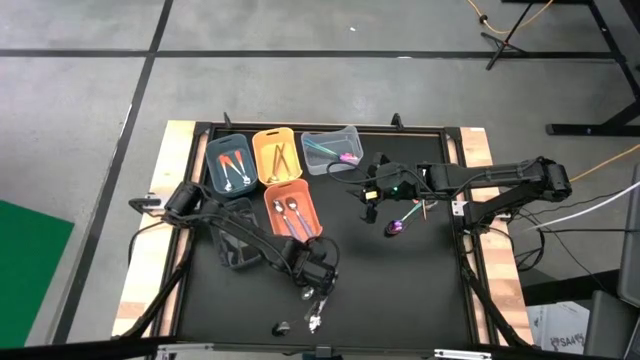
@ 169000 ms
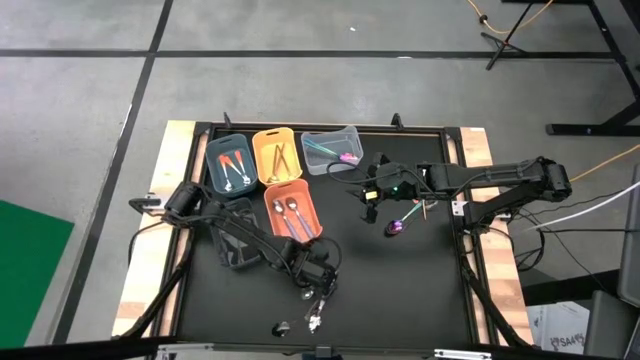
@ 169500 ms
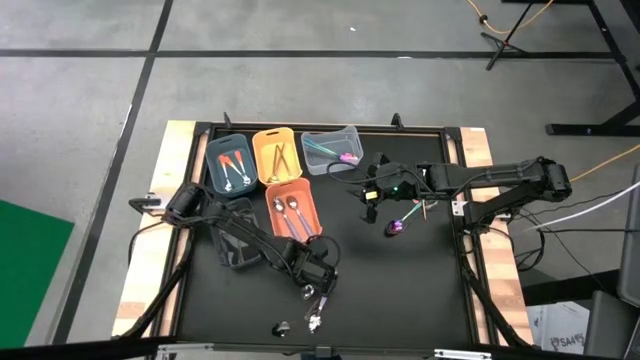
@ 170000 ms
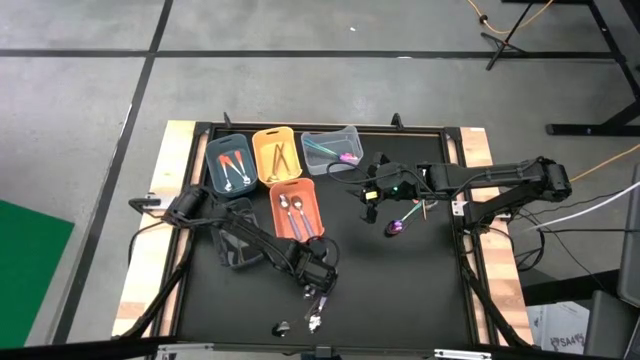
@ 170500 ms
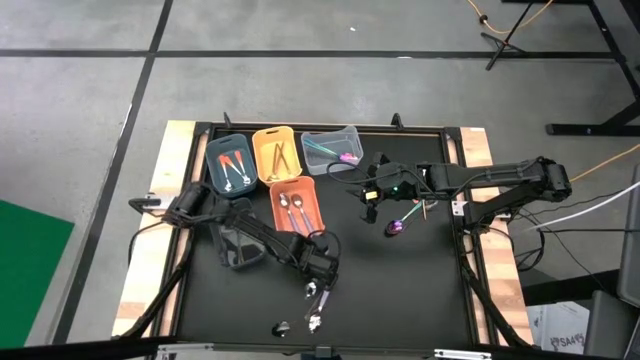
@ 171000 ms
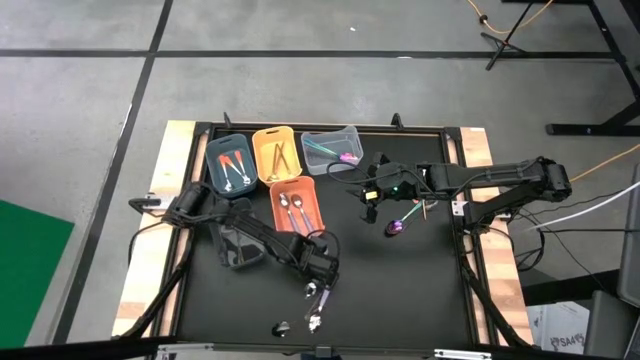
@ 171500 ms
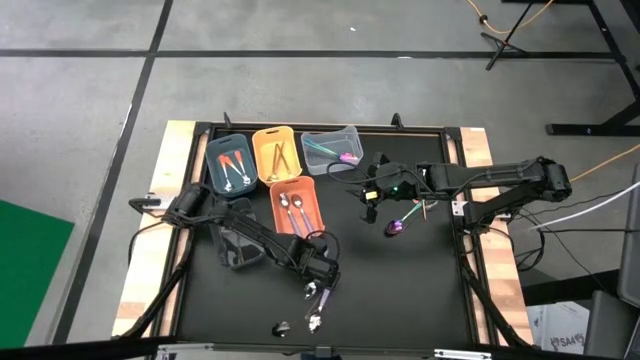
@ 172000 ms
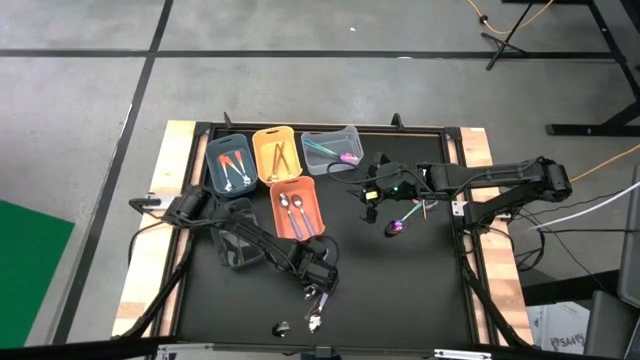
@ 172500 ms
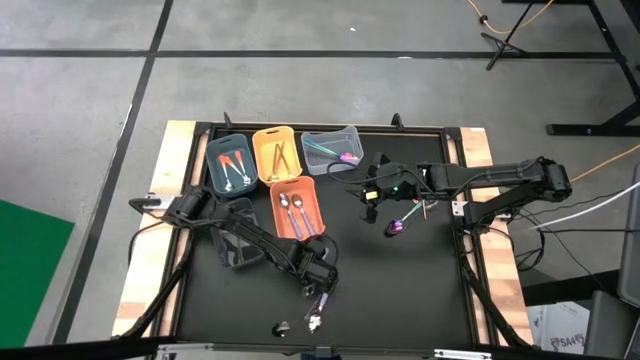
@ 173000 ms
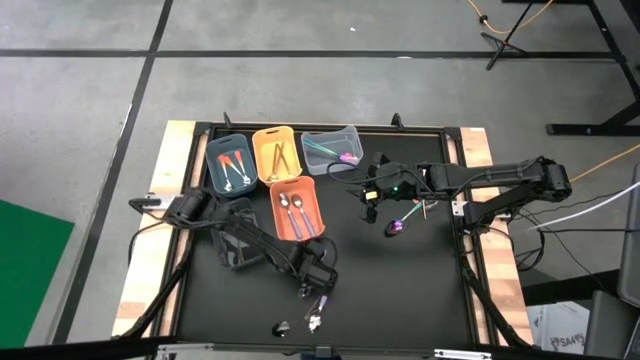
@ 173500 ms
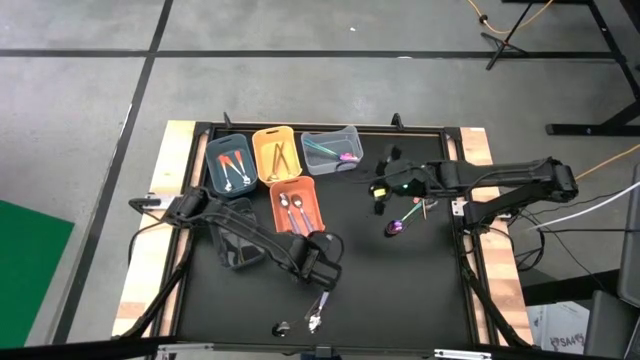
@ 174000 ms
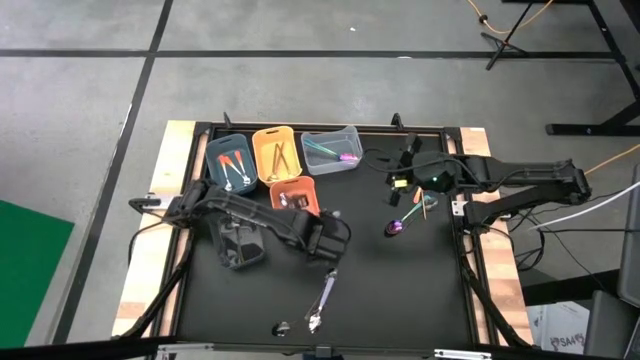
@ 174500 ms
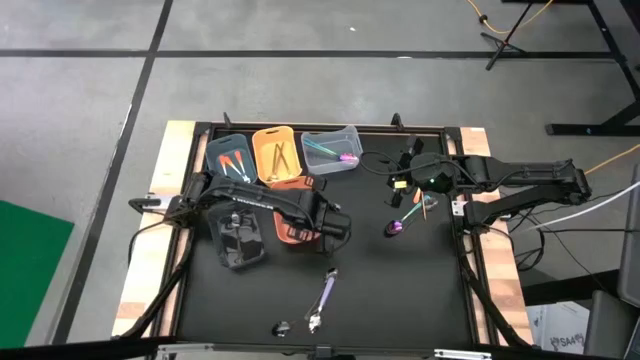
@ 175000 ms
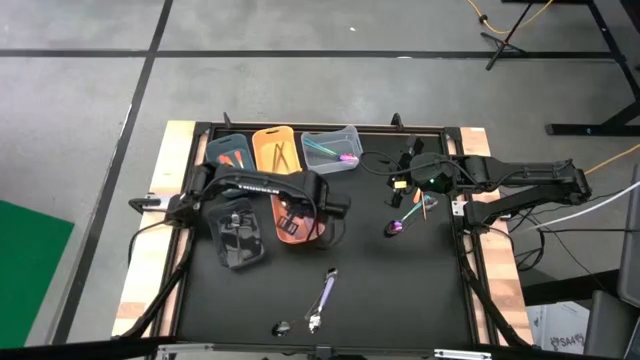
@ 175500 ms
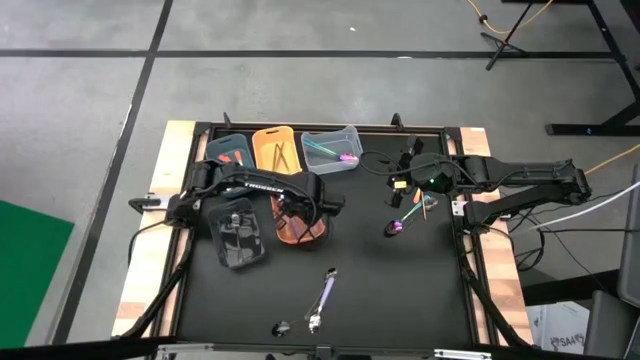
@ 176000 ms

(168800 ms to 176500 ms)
Task: Sort silverware by color (type)
Put the purple spoon into the orange bin

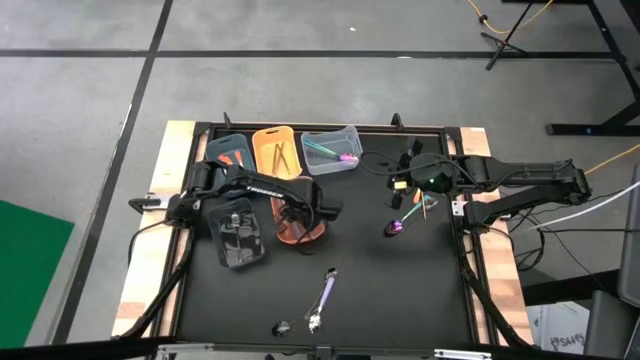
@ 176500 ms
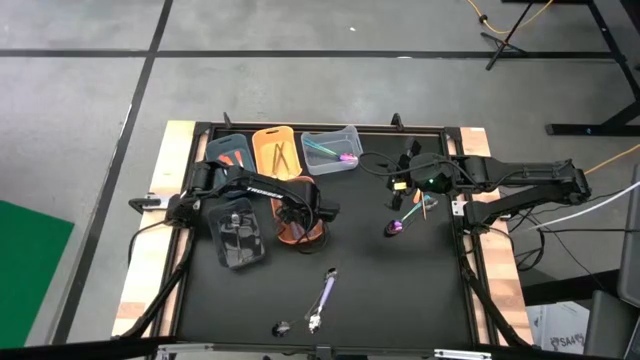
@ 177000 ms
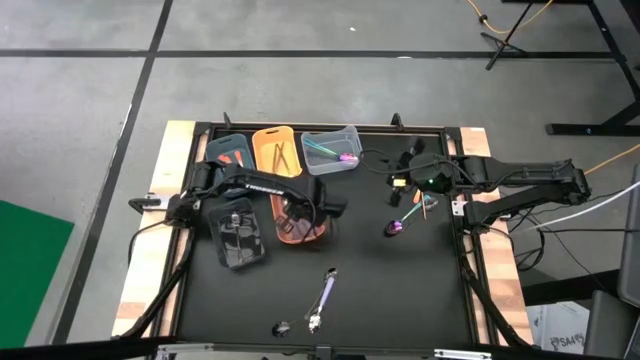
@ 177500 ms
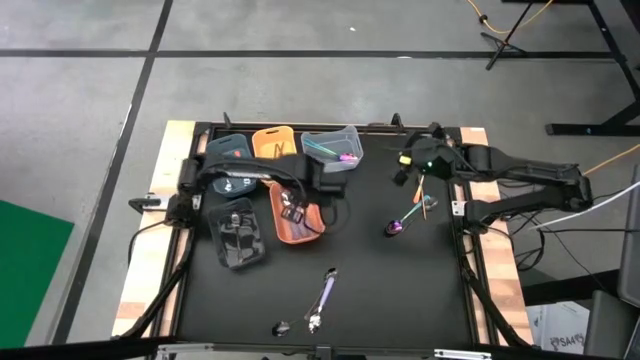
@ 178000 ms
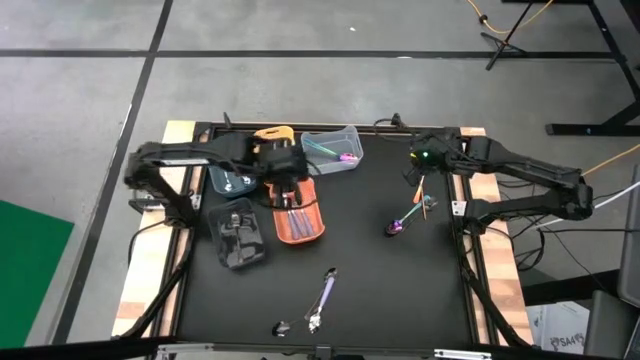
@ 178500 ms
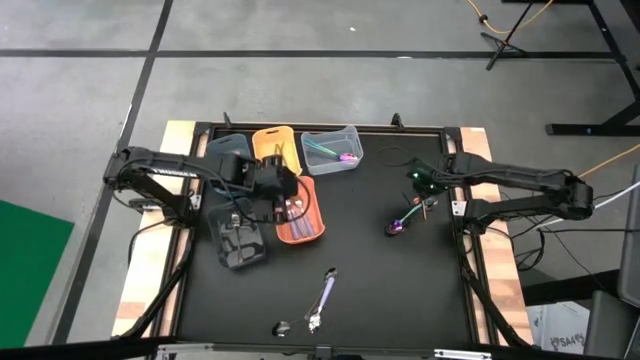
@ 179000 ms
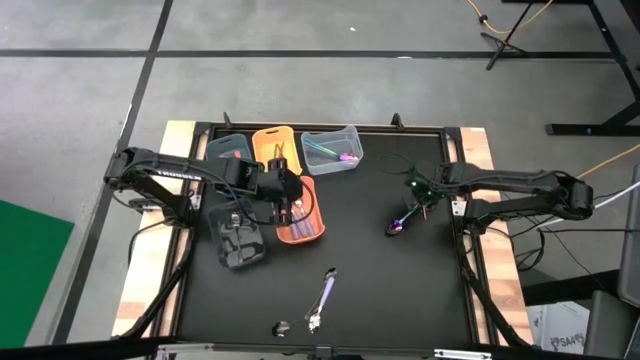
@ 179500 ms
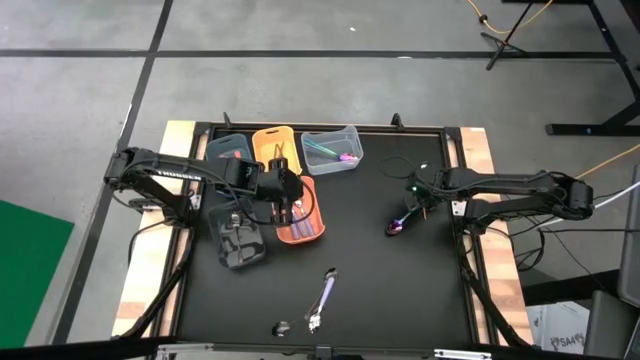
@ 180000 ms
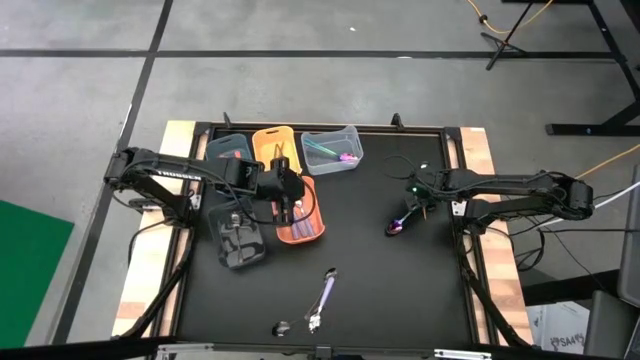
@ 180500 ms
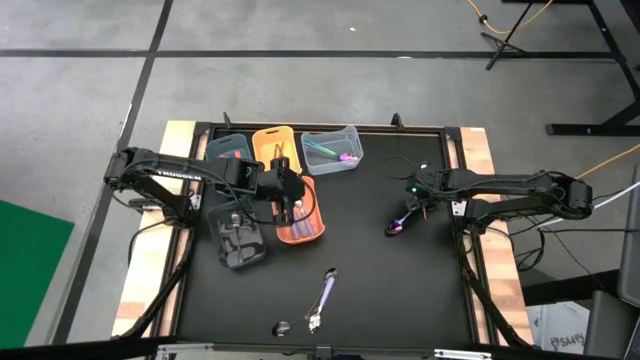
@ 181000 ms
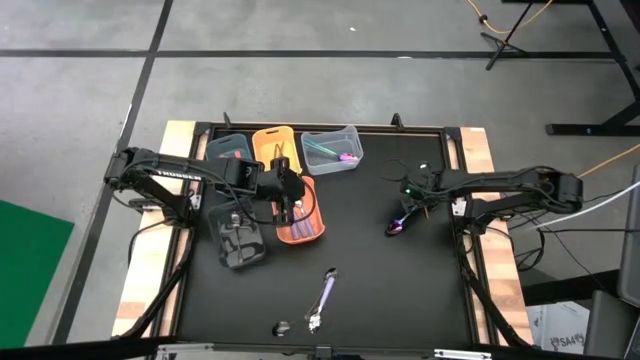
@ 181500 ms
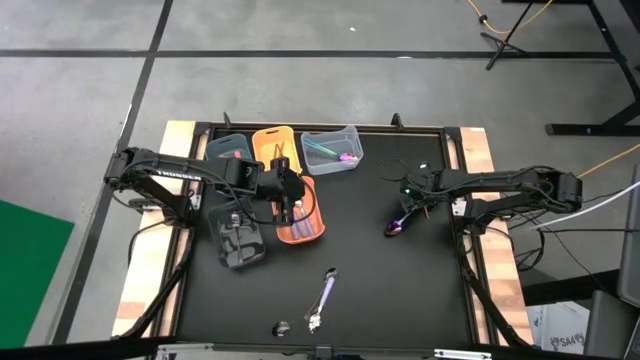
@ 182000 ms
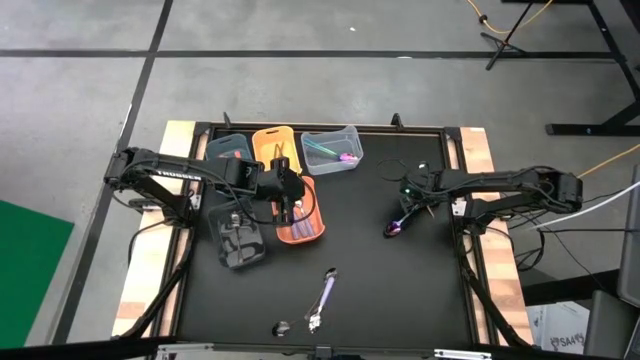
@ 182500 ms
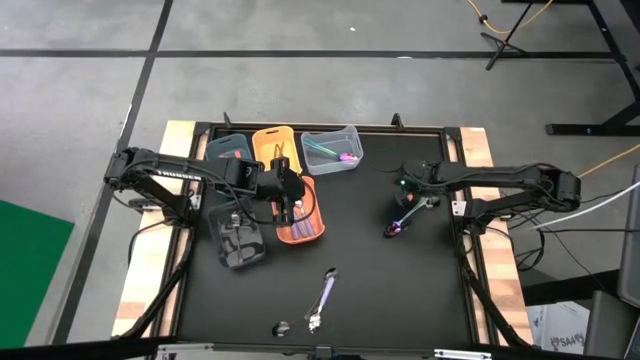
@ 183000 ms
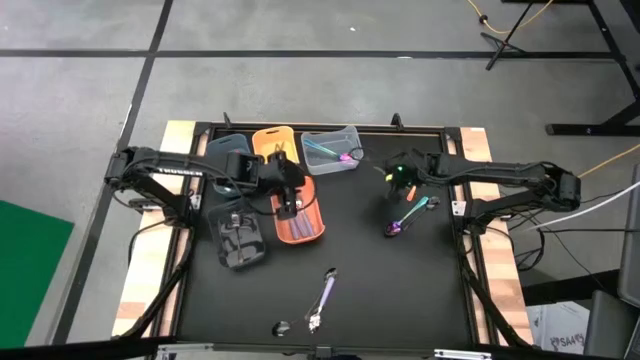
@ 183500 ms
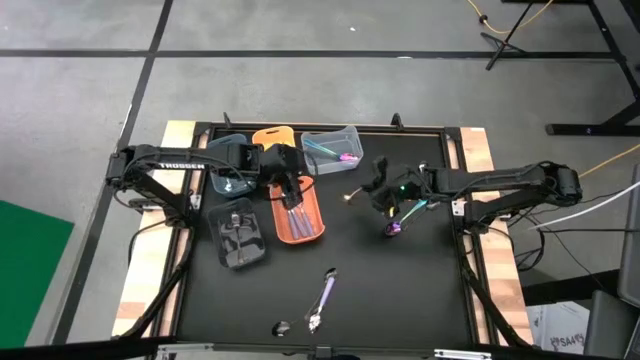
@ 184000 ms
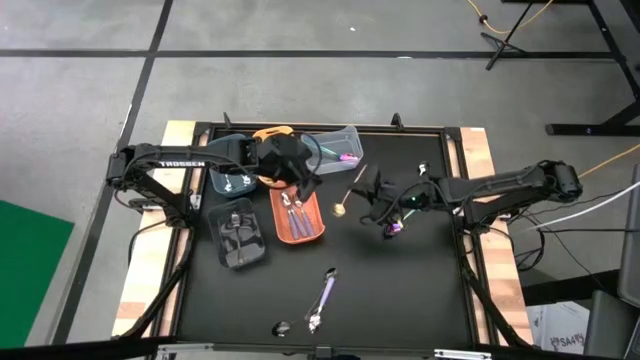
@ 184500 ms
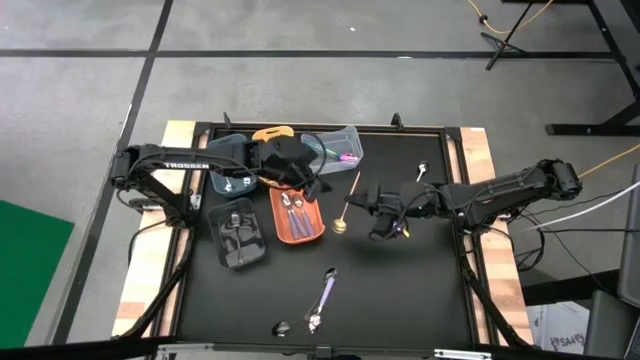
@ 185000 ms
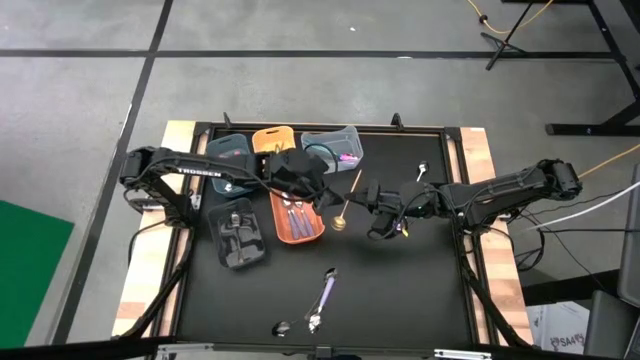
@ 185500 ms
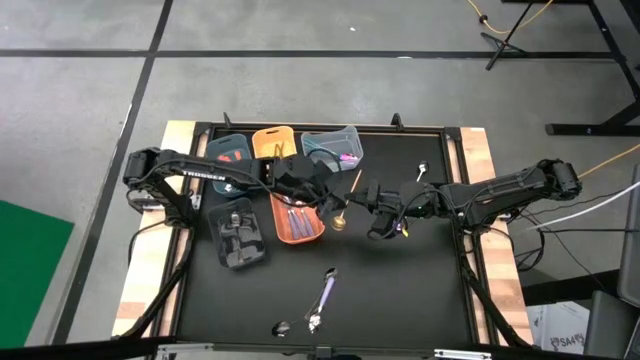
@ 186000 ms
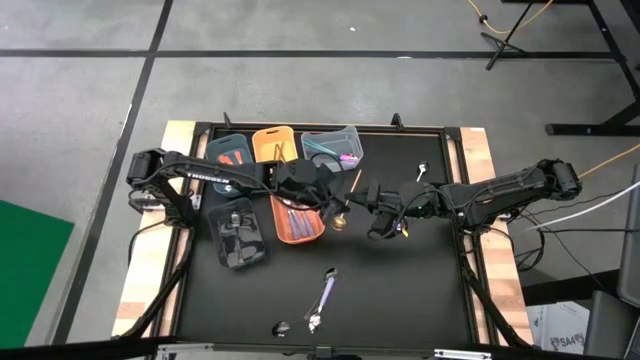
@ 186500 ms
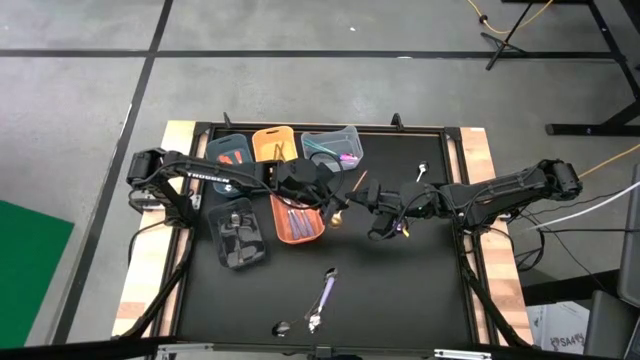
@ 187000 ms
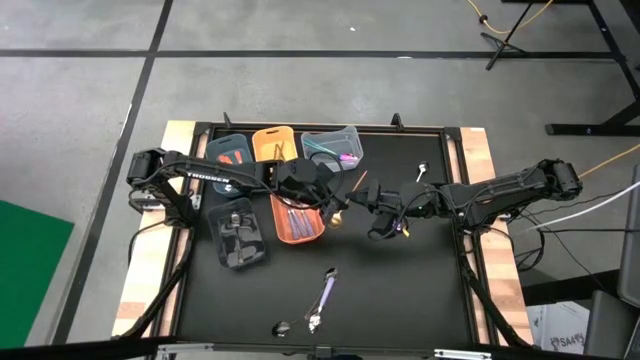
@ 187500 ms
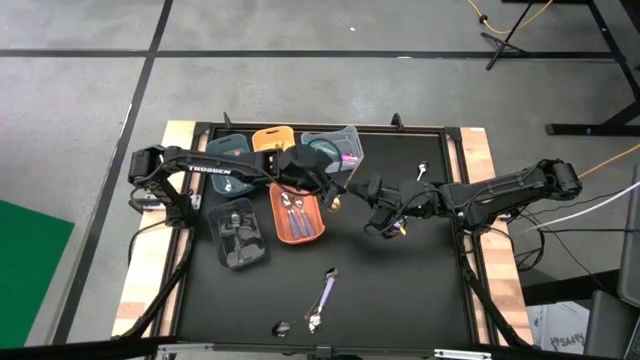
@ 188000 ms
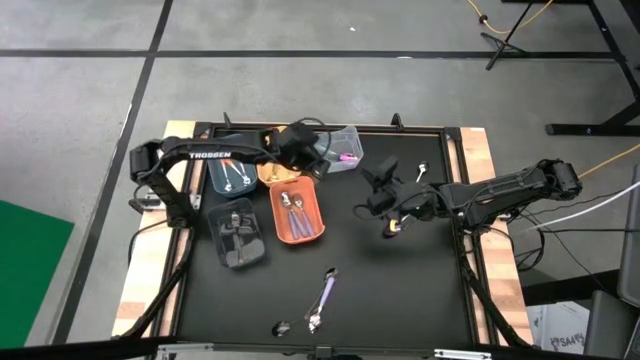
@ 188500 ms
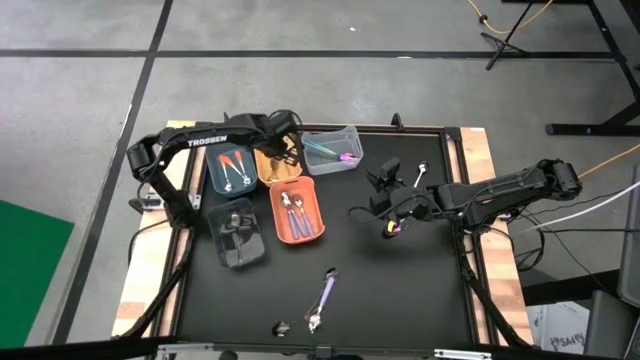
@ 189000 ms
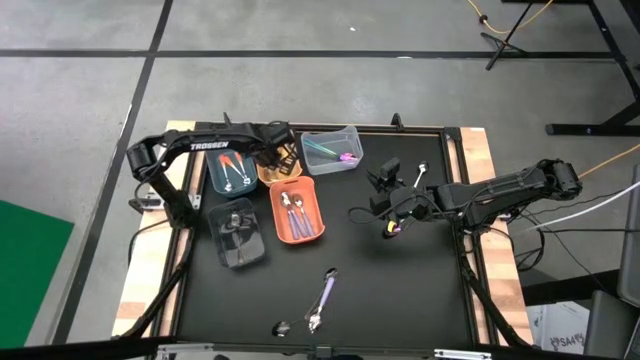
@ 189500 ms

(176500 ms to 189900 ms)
Put the gold spoon into the yellow bin
